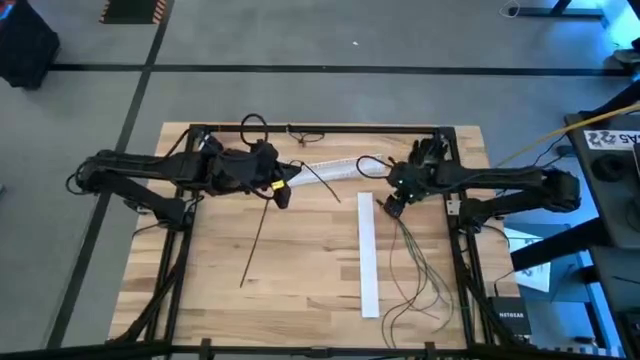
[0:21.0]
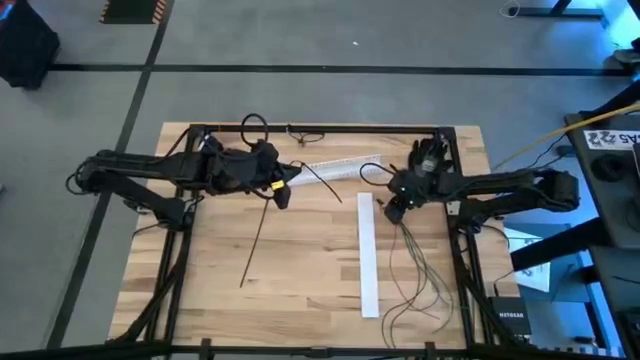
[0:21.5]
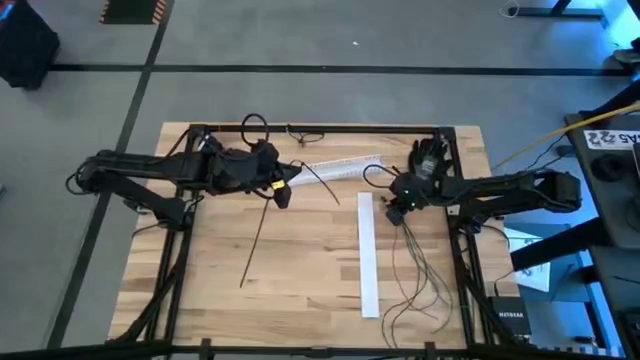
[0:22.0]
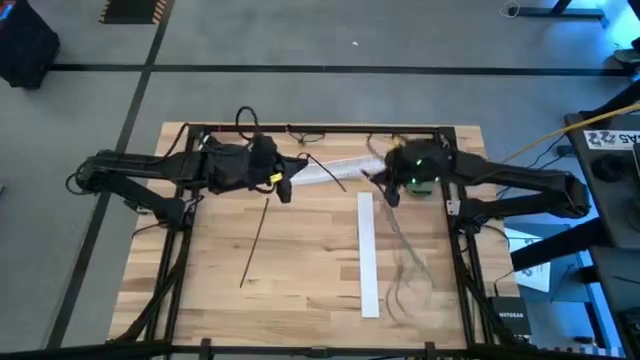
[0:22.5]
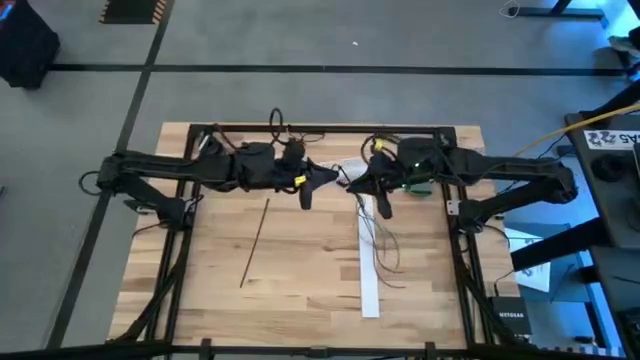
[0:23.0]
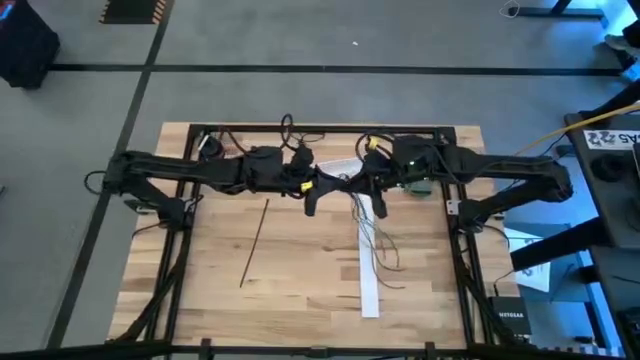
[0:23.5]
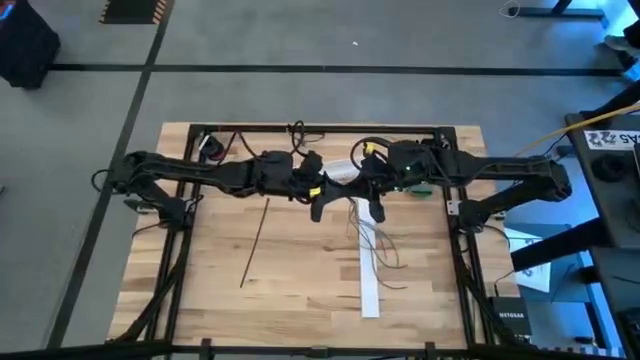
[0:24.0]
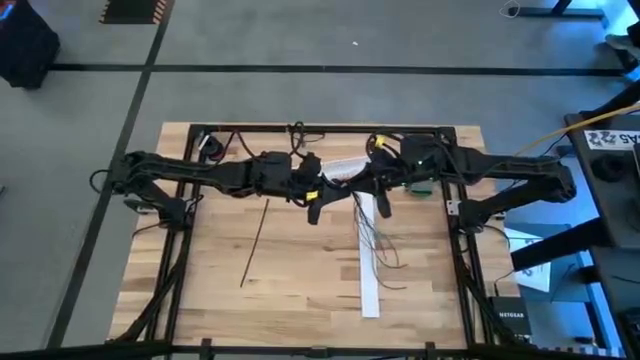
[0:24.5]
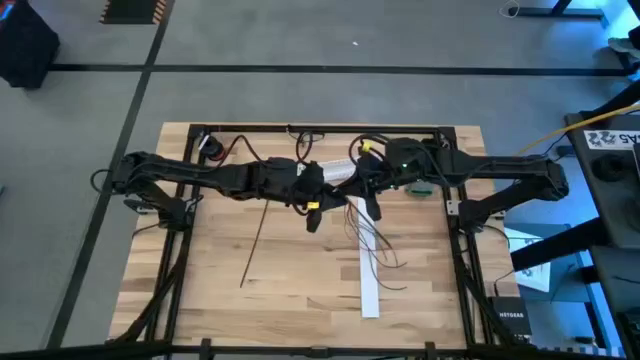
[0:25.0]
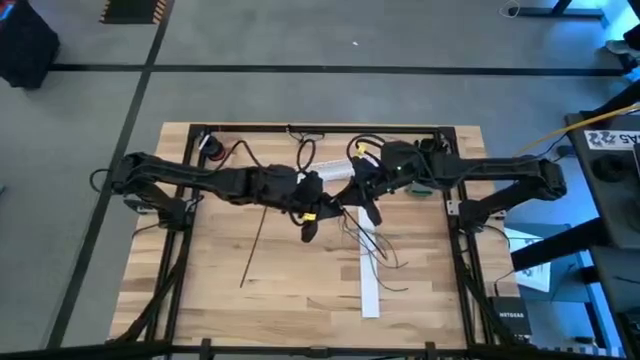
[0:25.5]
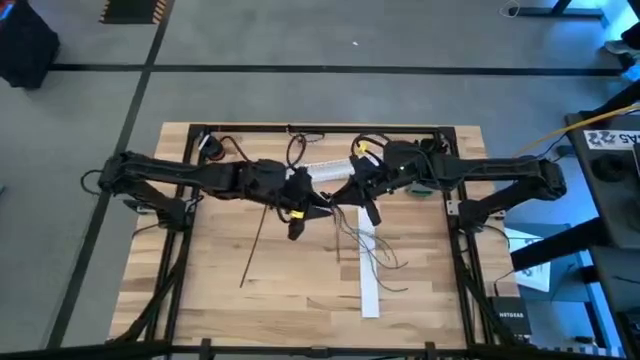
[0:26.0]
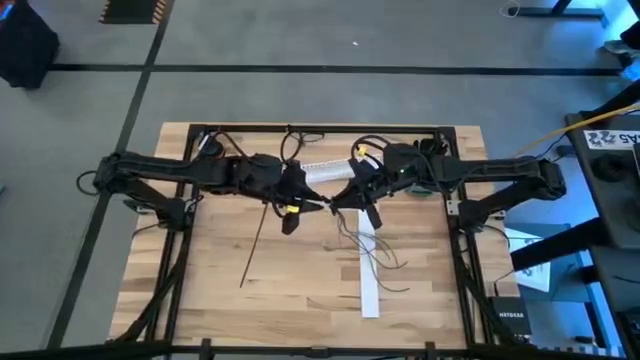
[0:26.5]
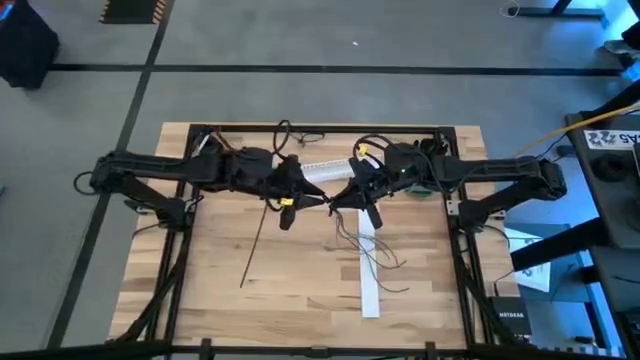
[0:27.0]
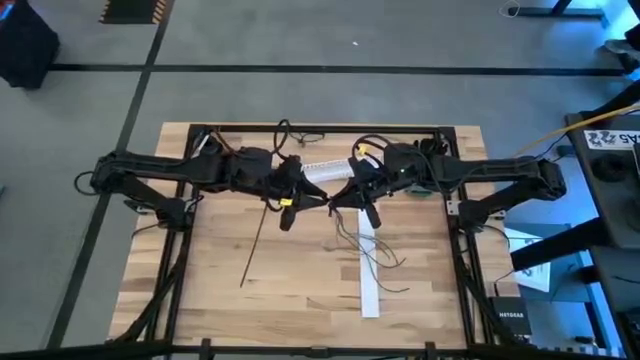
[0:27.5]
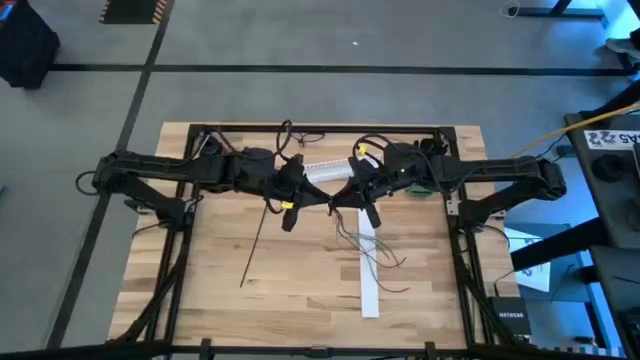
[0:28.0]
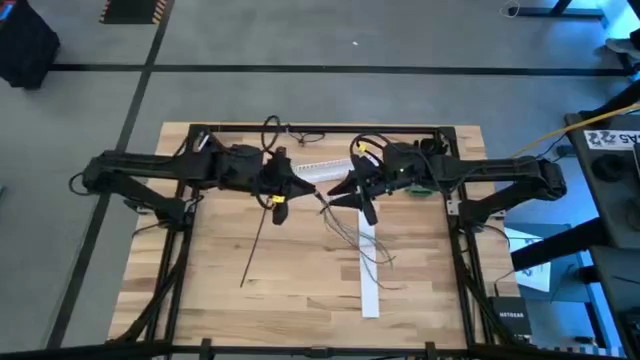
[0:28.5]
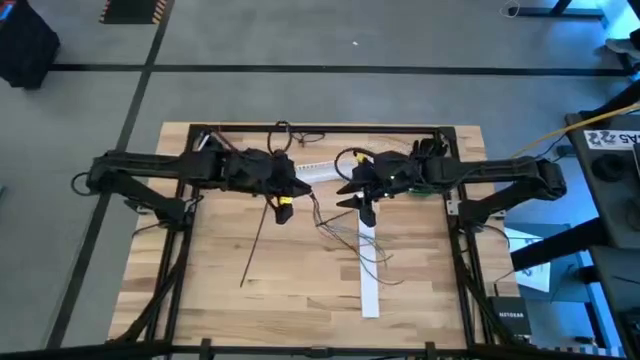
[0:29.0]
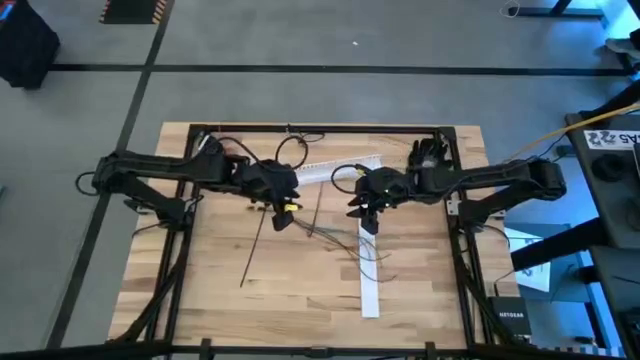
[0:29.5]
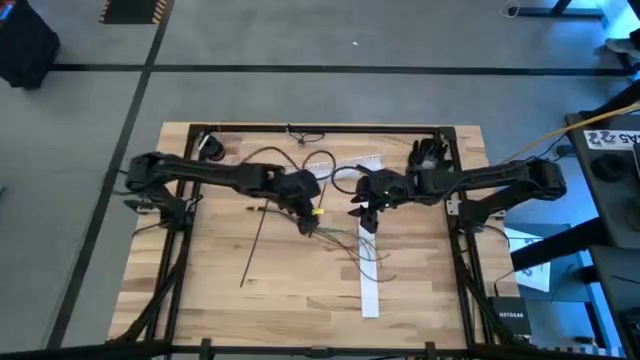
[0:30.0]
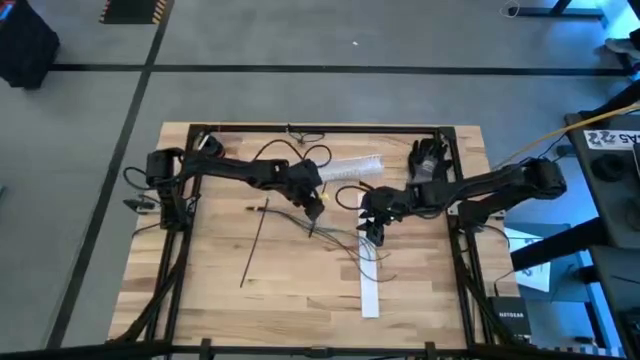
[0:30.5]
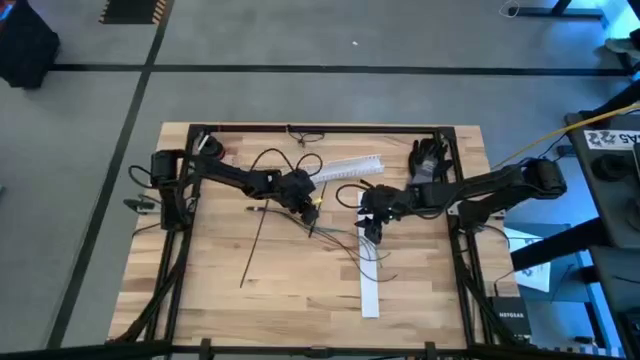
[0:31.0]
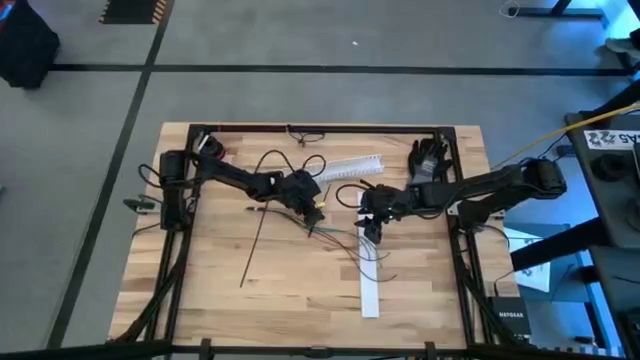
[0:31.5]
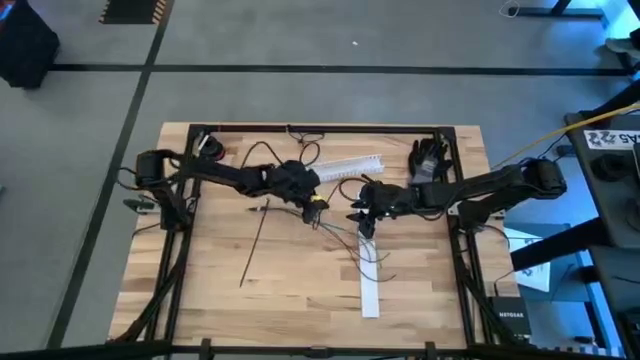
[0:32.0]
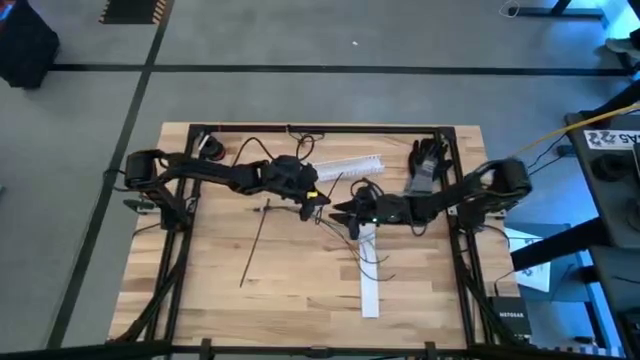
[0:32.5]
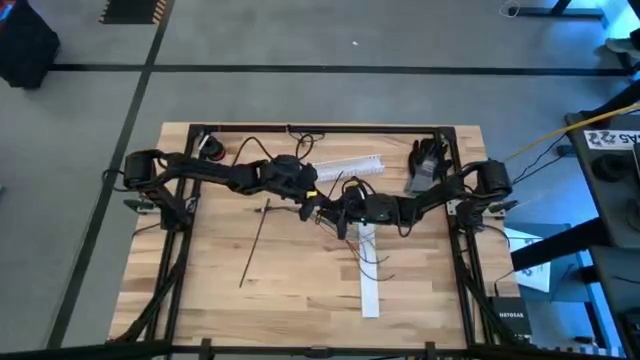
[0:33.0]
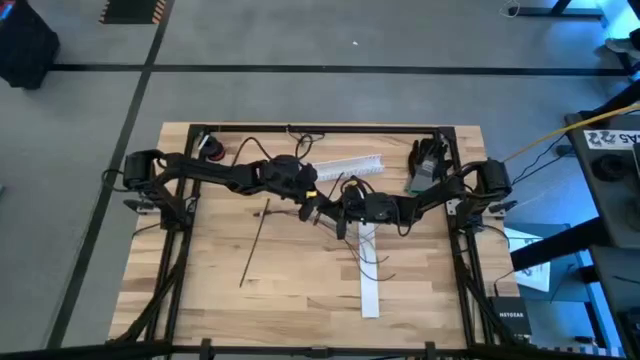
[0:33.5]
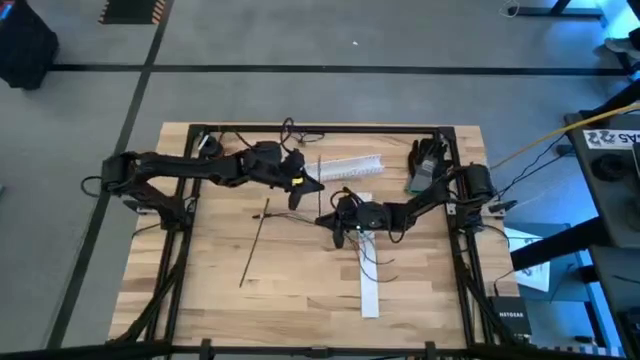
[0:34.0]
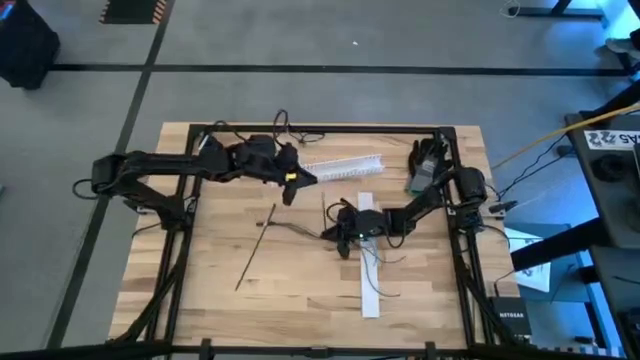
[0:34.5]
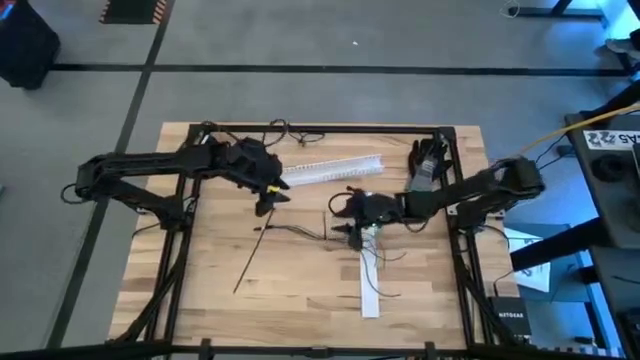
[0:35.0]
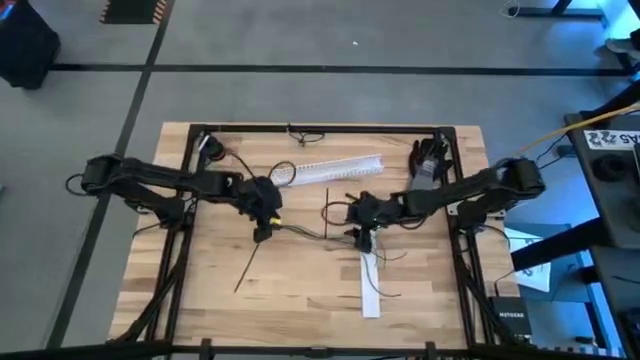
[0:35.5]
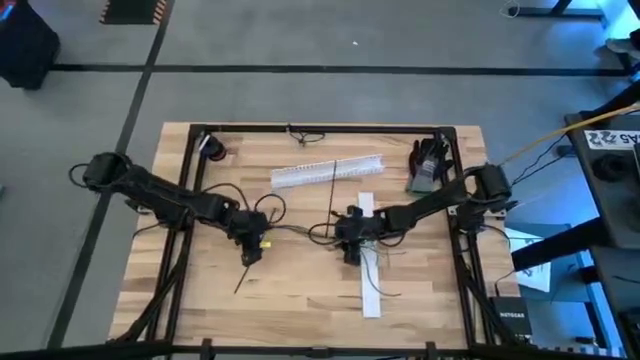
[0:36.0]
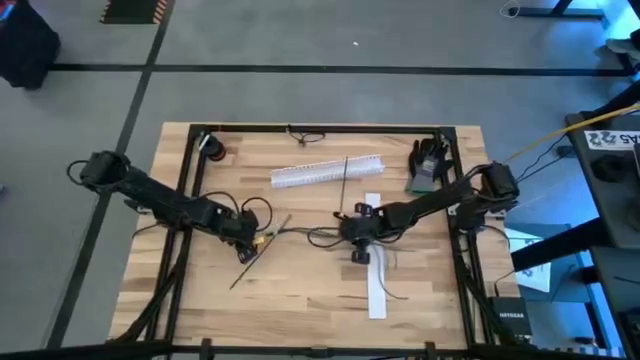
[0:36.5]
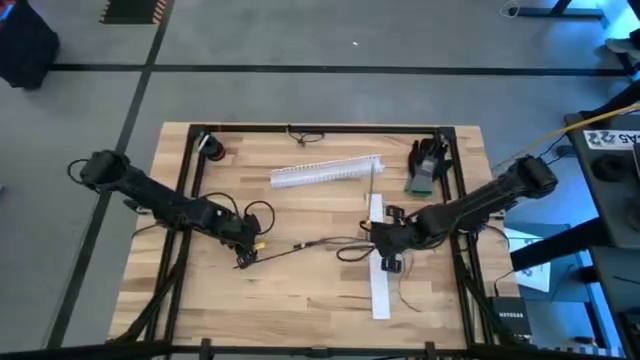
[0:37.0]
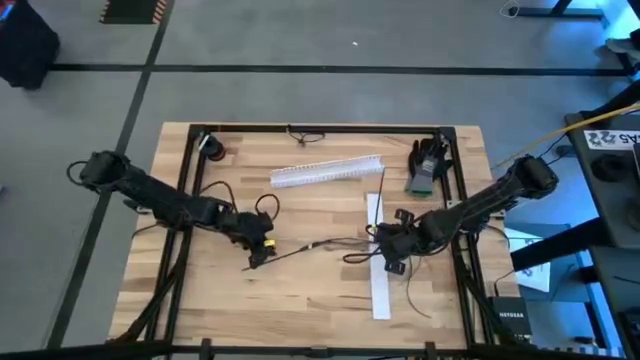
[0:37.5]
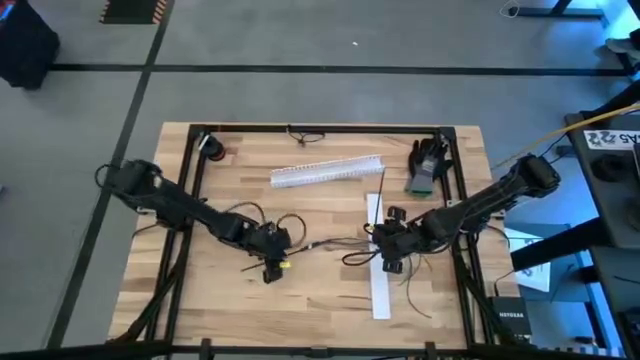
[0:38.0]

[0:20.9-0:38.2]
Task: Ziptie cables
Wrap the right black zip-tie around the cable wires
